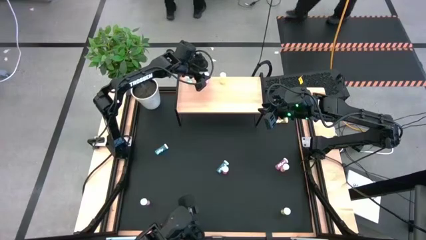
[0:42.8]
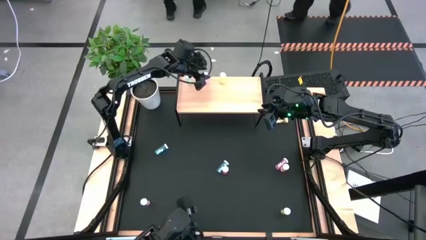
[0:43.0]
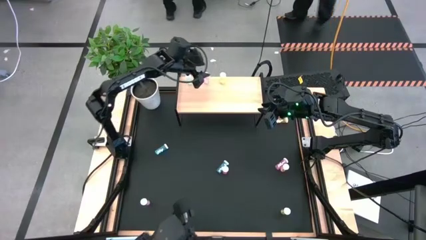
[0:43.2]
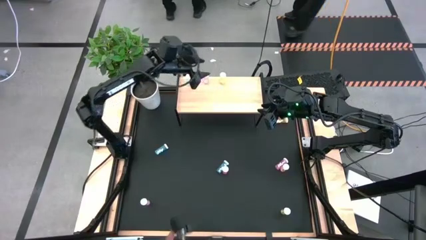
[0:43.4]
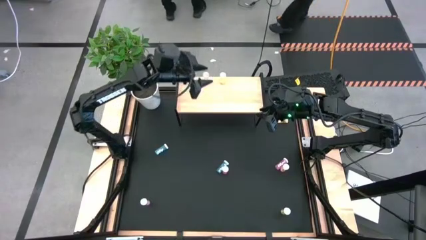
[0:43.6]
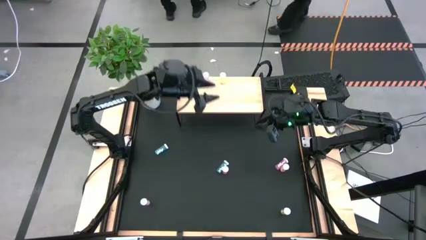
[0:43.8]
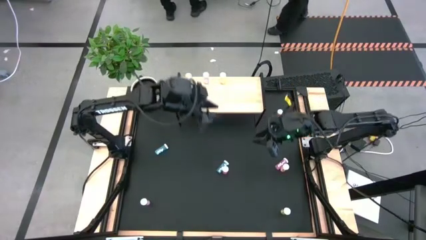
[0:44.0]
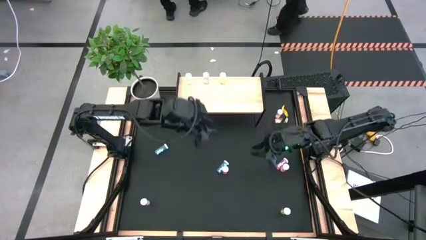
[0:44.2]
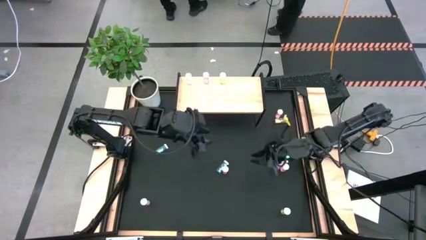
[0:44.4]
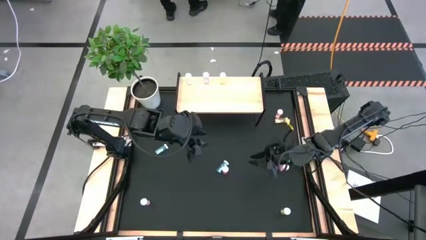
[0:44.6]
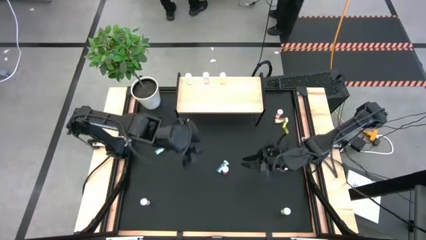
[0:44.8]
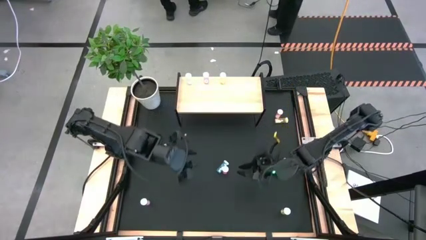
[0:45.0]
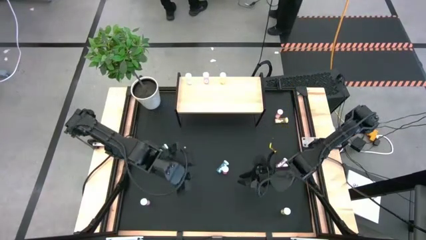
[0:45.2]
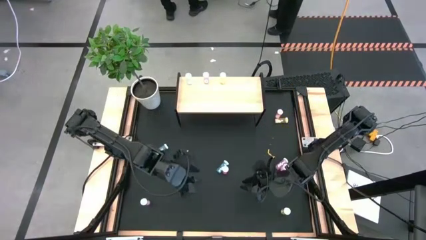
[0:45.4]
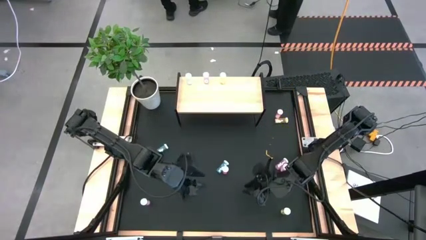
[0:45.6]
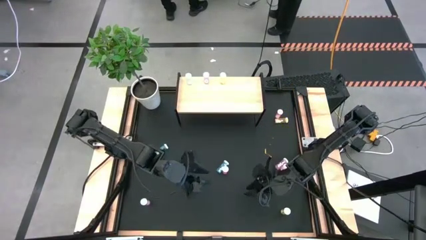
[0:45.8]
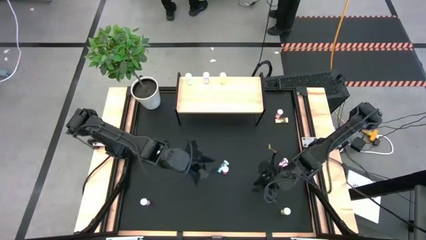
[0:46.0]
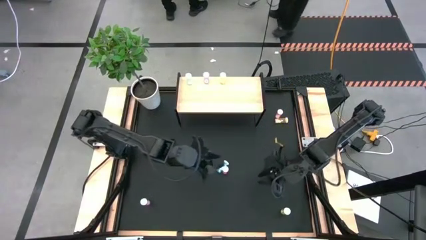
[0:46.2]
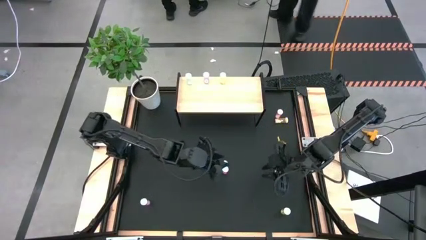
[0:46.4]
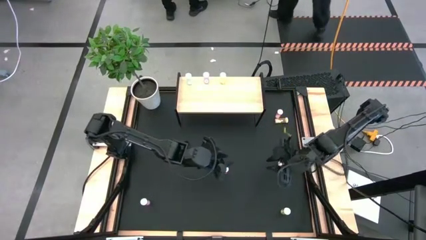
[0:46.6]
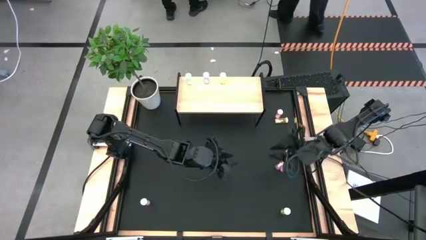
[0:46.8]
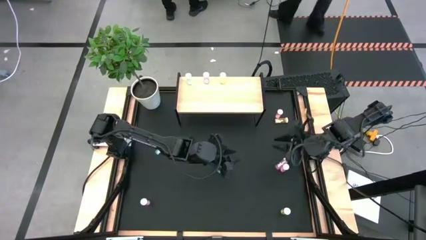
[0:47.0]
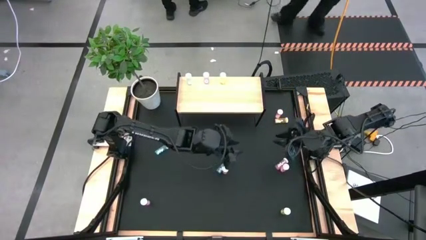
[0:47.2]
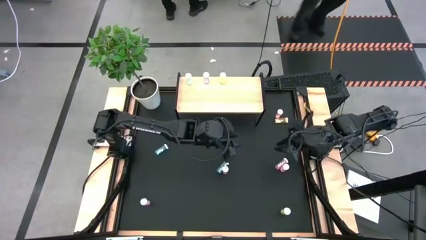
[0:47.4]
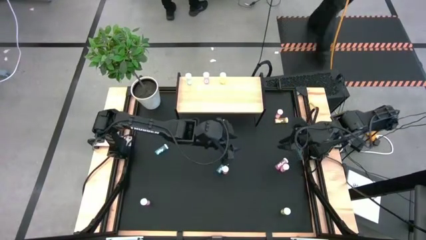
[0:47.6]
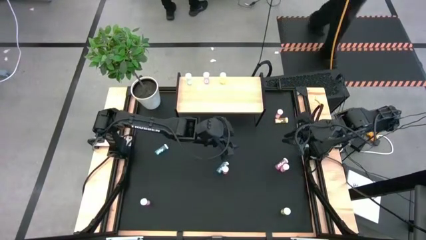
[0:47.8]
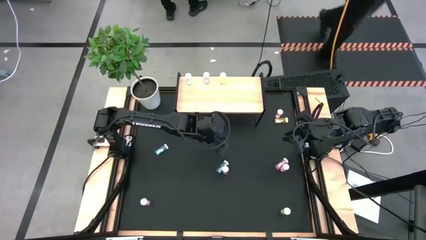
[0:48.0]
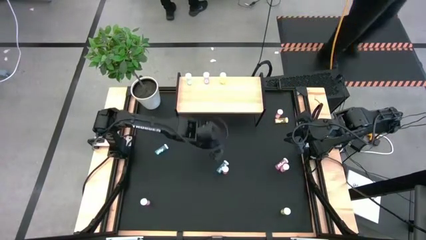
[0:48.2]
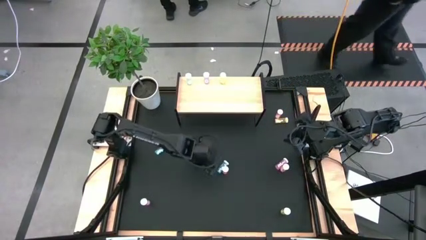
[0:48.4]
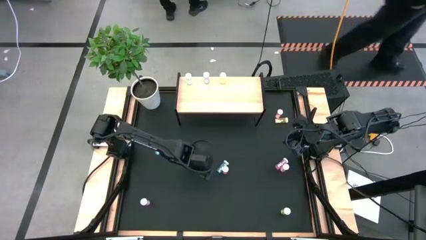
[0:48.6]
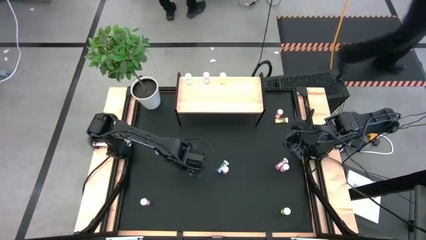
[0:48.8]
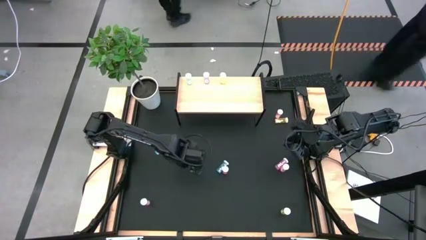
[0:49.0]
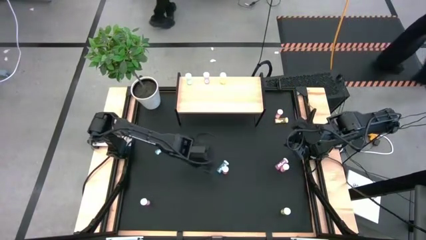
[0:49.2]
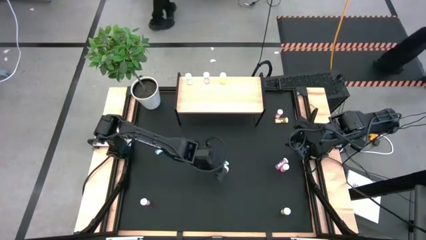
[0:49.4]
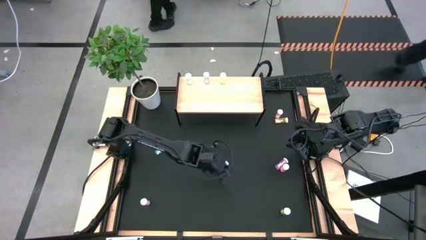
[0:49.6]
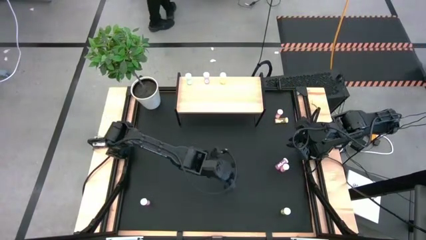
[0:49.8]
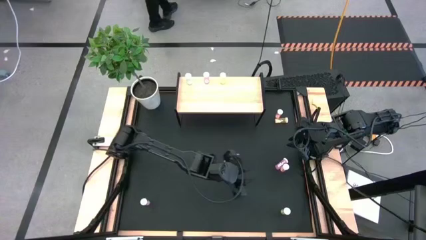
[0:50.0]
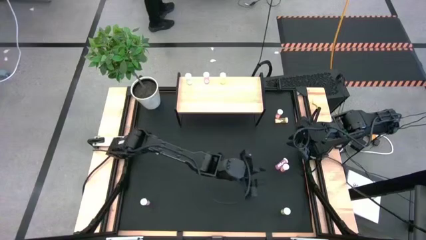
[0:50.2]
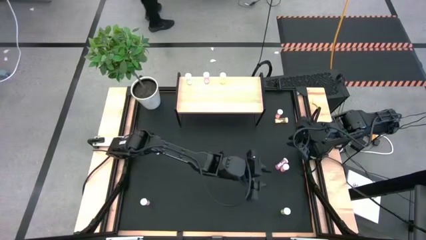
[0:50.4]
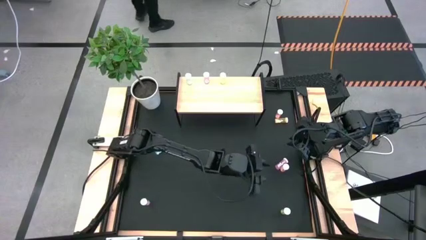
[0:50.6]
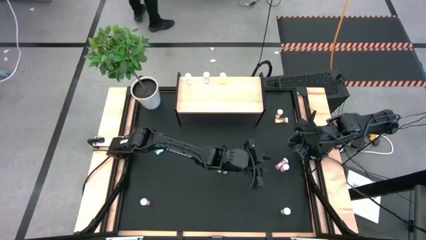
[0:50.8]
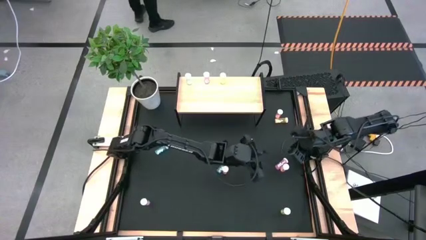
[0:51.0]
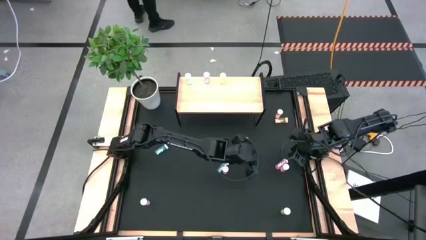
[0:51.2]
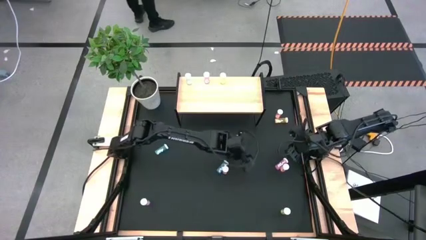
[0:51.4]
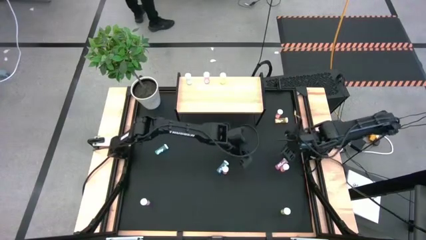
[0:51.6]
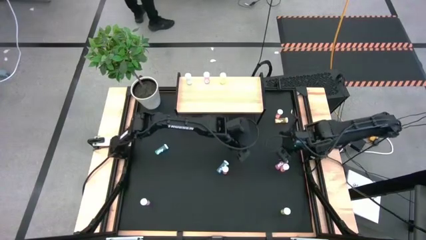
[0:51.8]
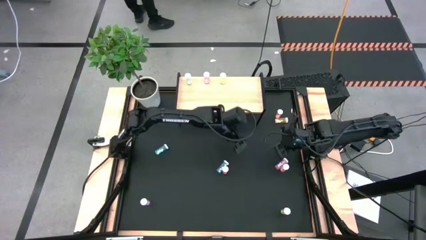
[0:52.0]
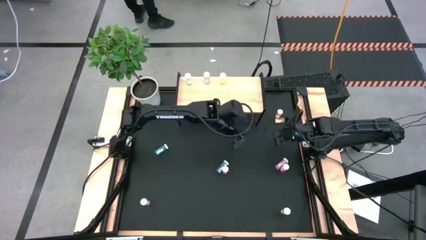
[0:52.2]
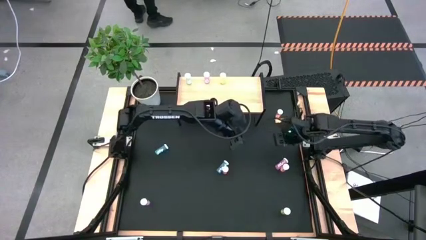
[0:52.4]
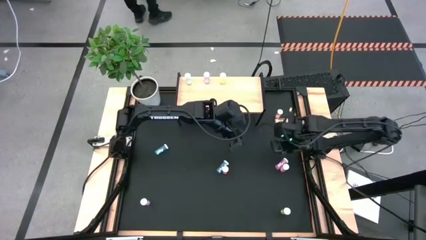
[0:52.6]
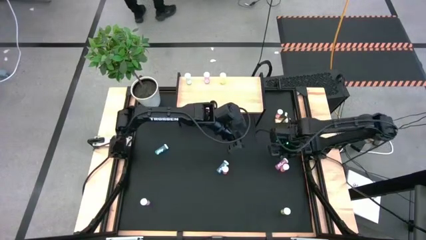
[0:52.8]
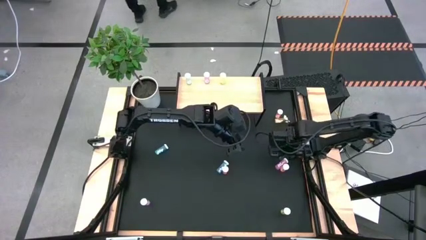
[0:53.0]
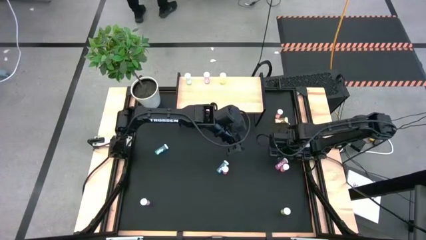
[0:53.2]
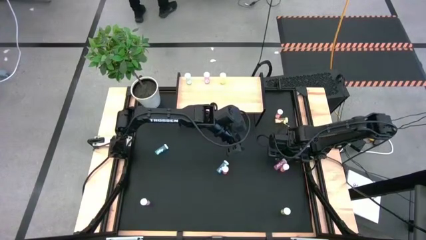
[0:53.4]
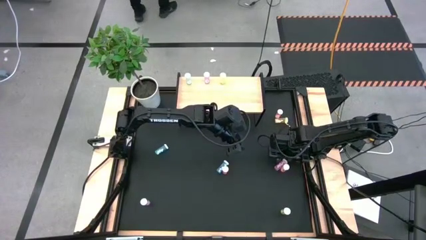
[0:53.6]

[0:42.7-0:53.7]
Task: Pick and place medicine bottles onto shelf by color
Put the right pink pill bottle on the shelf aligned with the other pink bottle
